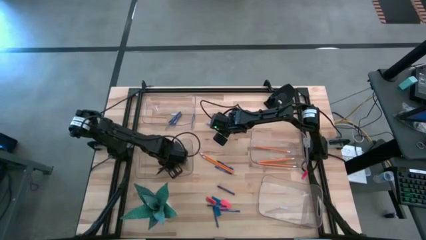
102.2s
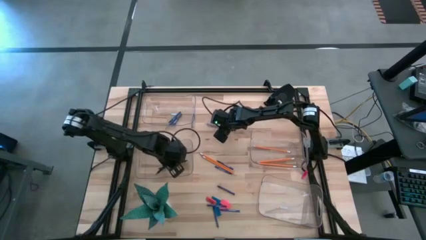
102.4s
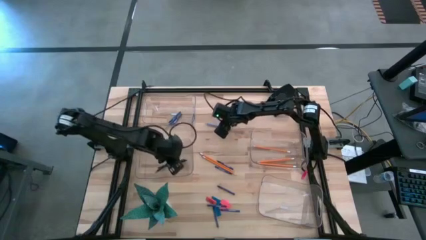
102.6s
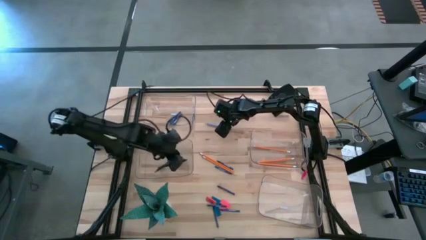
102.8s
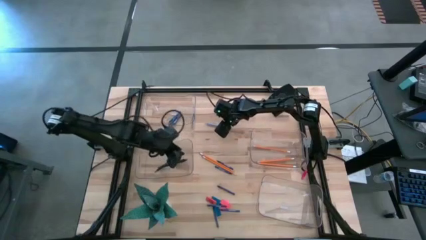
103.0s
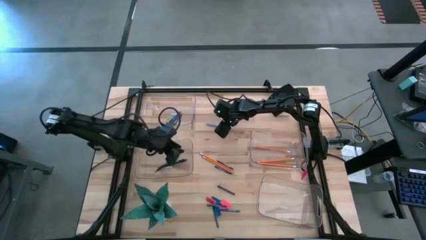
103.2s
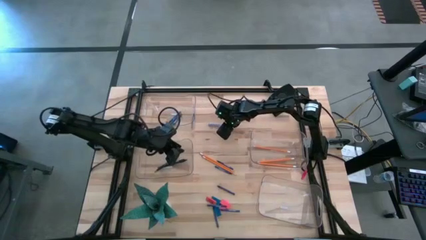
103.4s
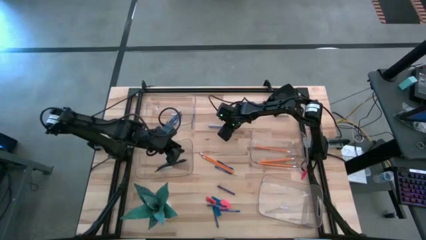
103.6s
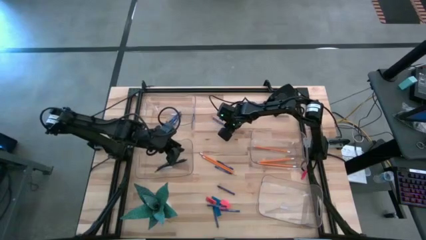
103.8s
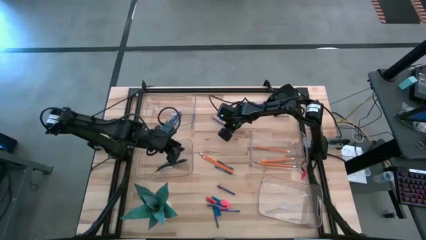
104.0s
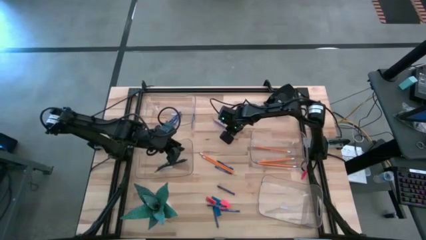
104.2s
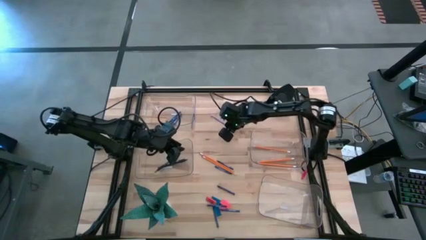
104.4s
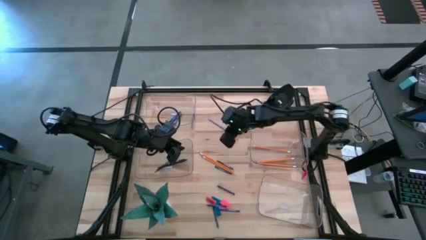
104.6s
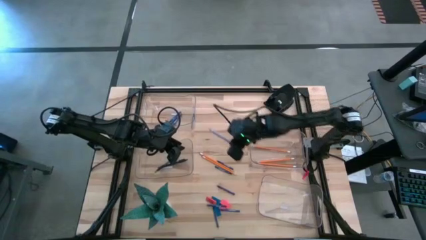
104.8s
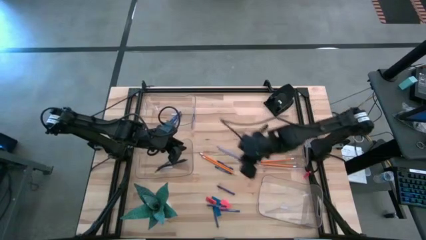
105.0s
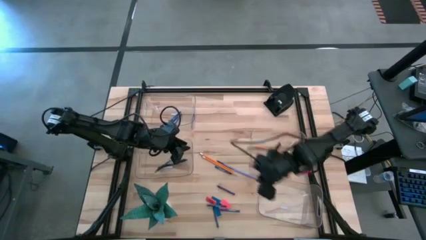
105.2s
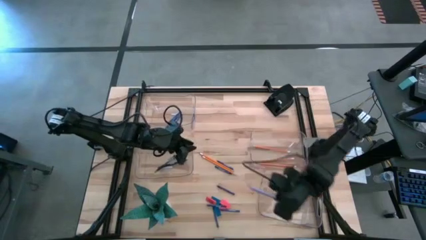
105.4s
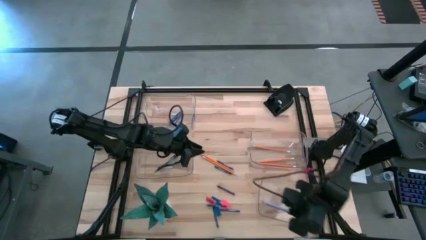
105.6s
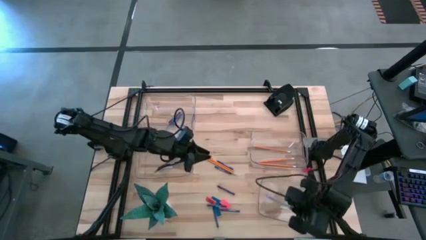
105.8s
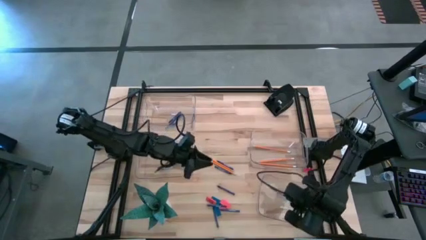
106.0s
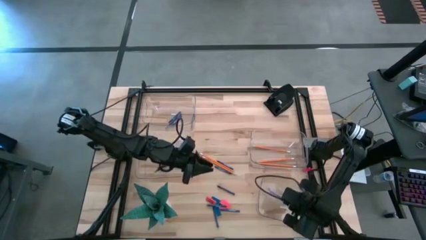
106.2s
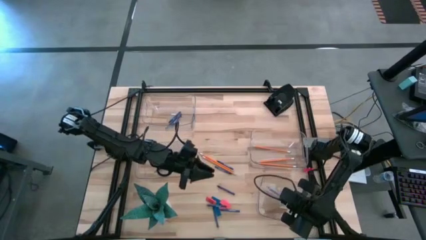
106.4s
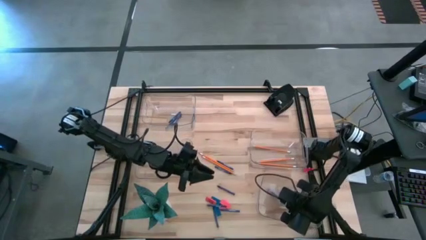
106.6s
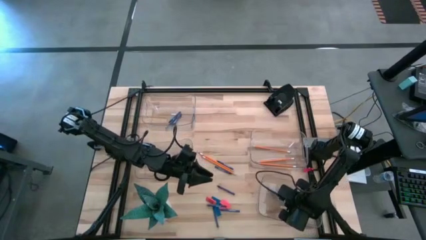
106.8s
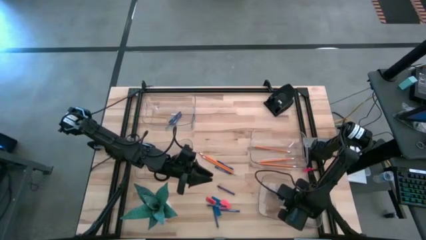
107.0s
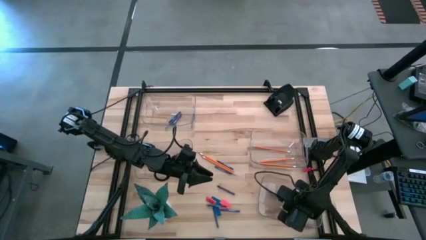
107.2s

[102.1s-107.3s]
Task: Sort crayons/erasers/pens/pencils in bins
Put the purple pen into the bottom transparent bin

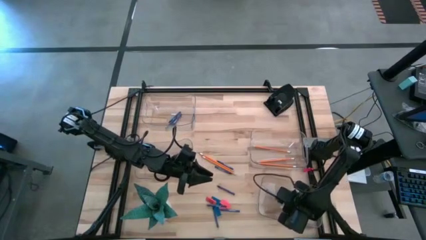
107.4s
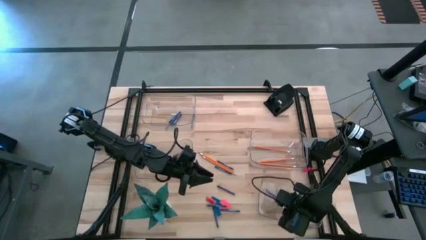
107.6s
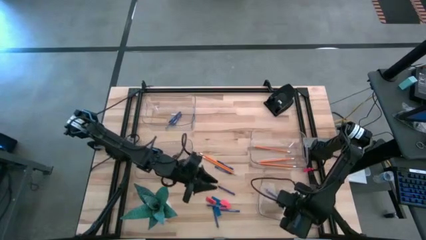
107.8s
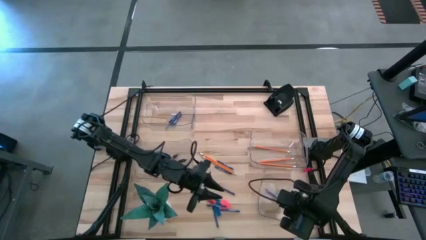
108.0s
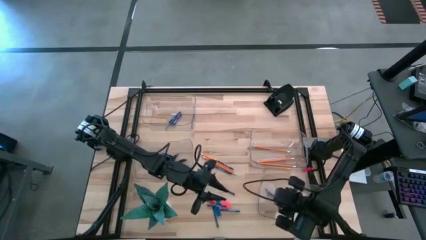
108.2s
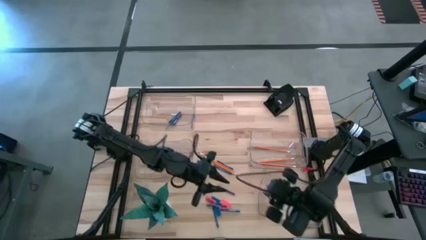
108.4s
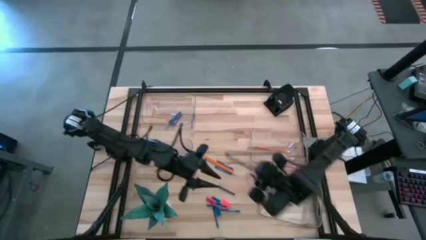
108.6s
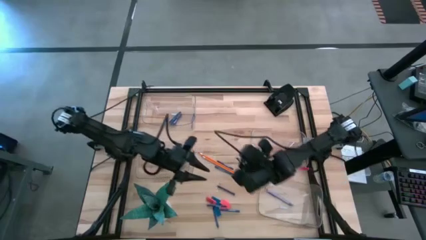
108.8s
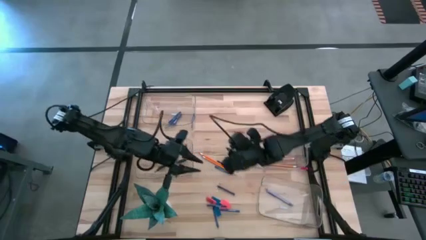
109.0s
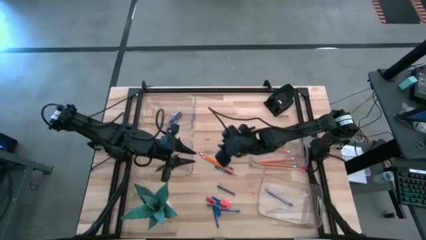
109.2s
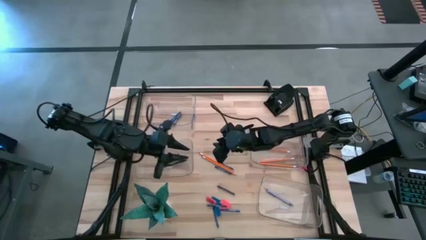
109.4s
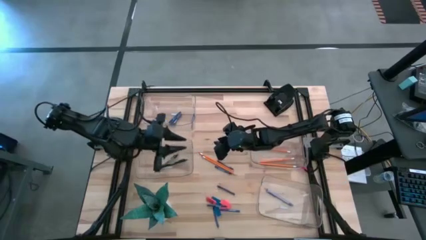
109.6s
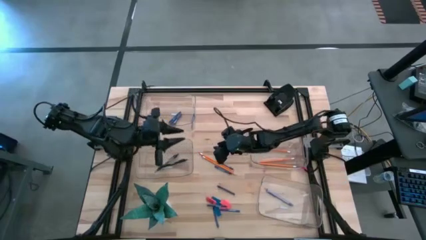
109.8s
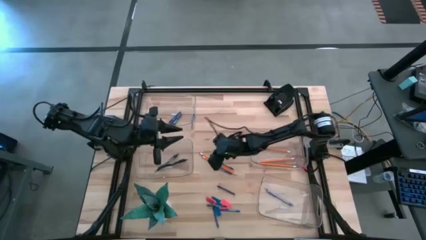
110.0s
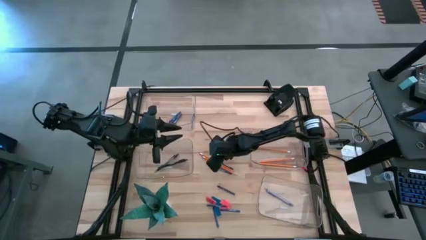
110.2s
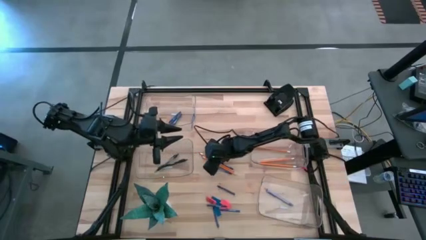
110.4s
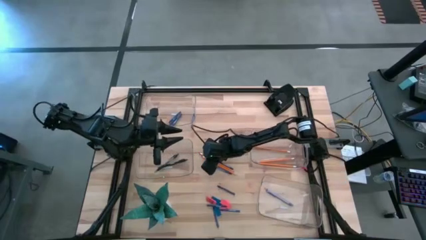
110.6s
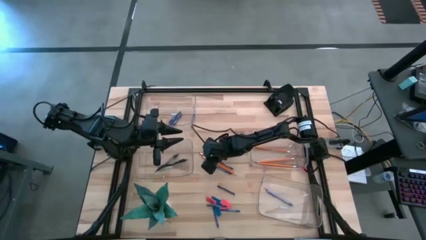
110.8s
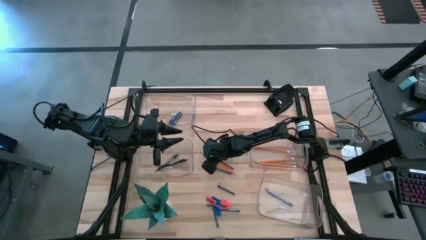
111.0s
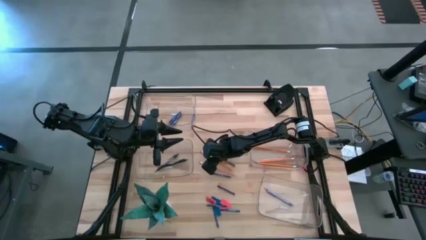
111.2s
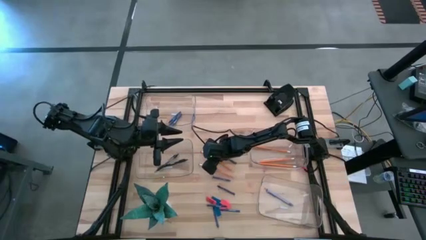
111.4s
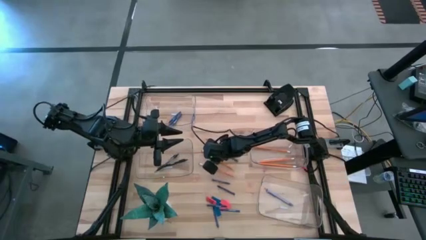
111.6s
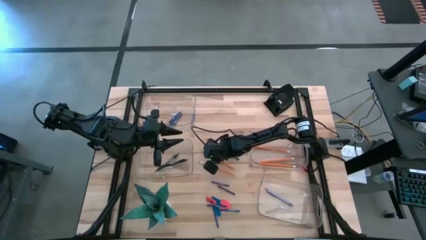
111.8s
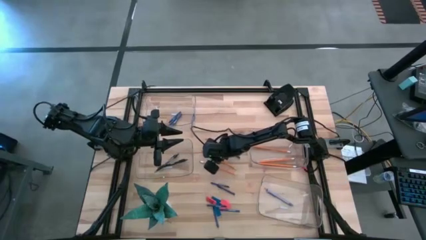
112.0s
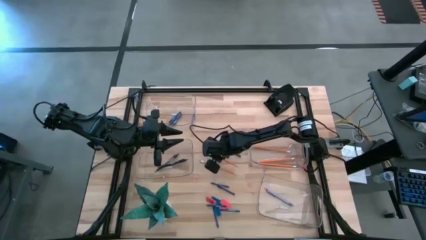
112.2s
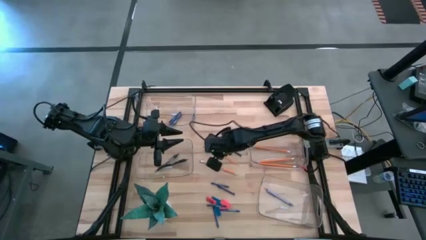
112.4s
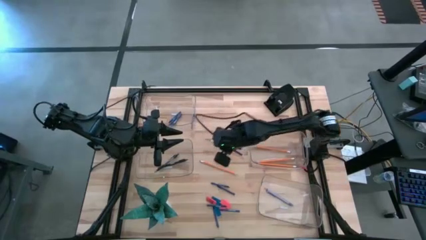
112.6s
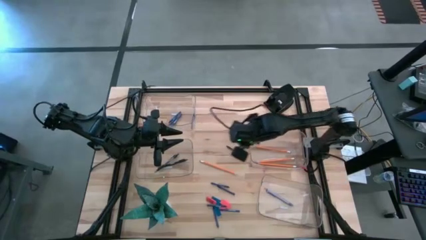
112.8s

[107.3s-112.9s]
Put the orange pencil into the middle right transparent bin

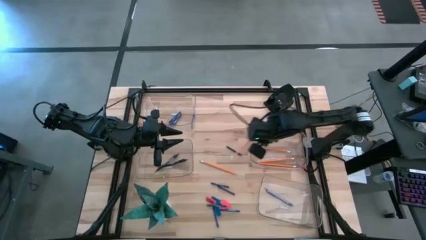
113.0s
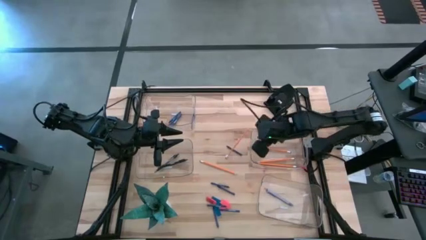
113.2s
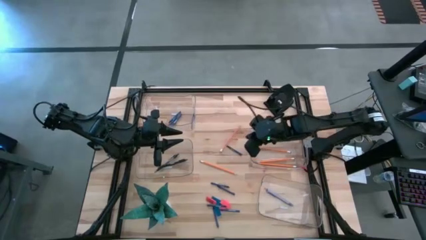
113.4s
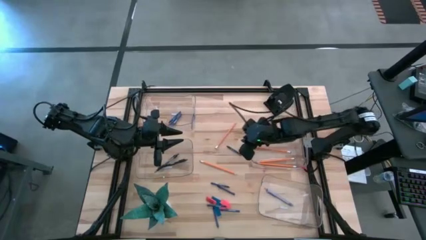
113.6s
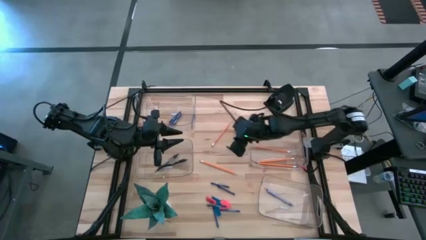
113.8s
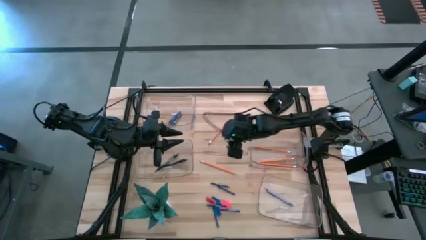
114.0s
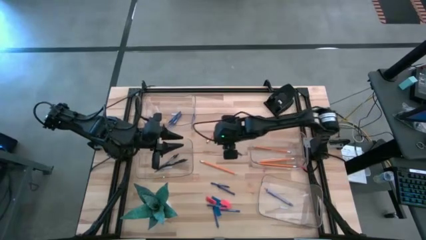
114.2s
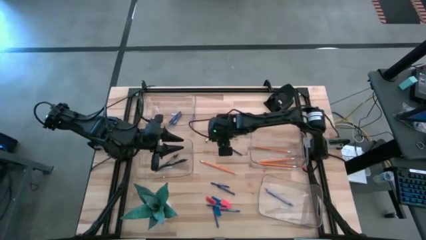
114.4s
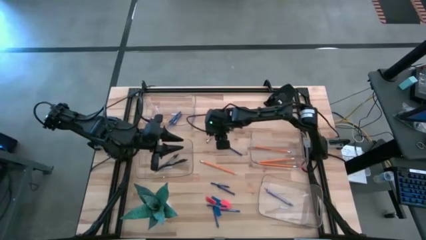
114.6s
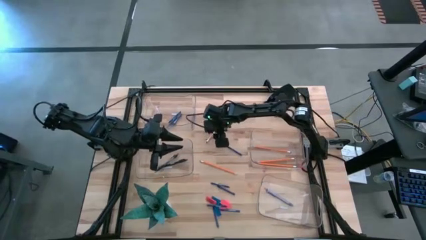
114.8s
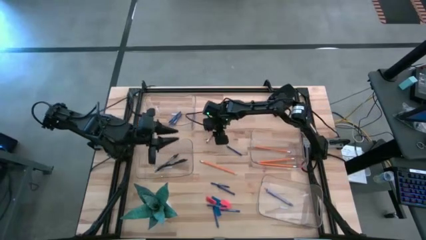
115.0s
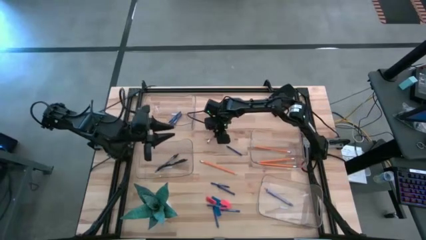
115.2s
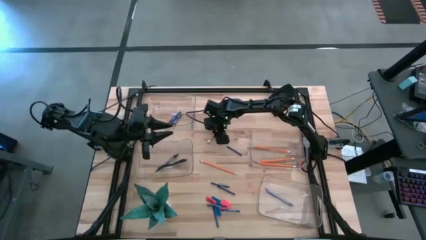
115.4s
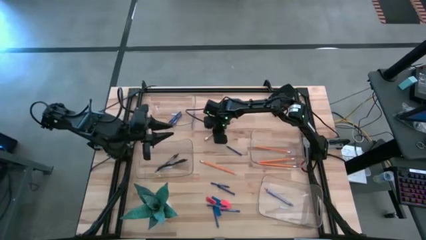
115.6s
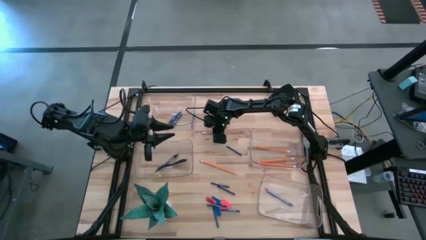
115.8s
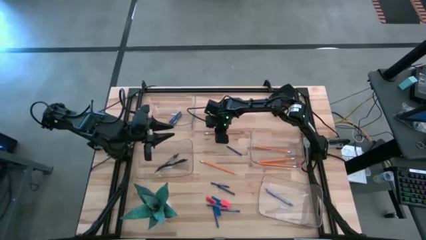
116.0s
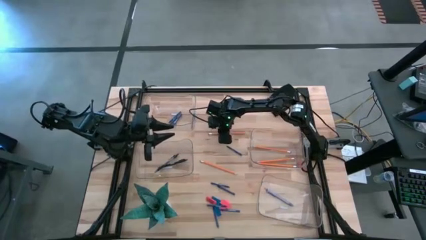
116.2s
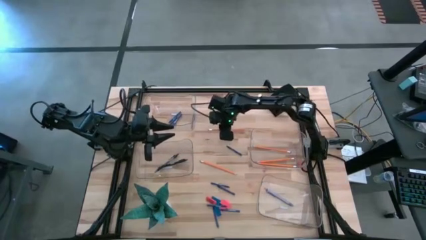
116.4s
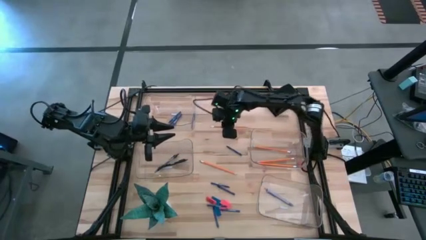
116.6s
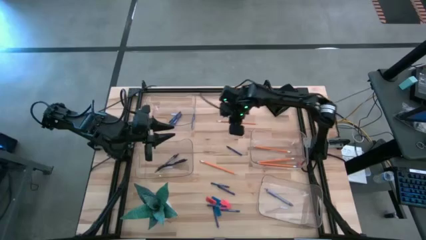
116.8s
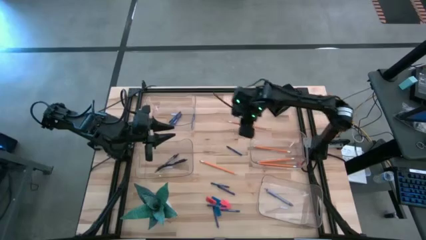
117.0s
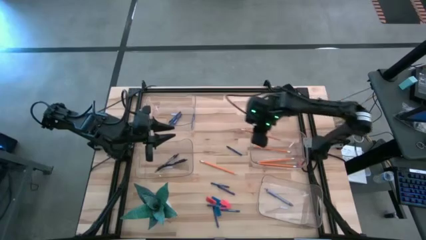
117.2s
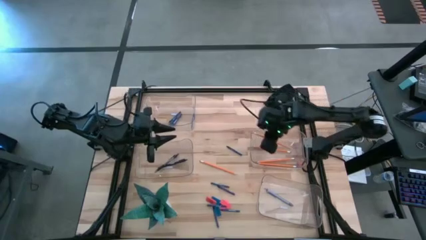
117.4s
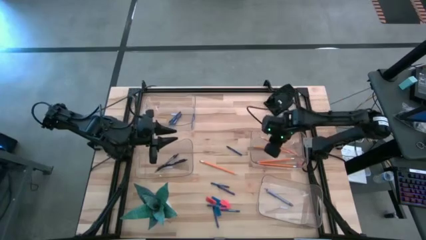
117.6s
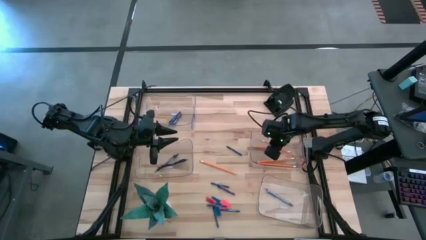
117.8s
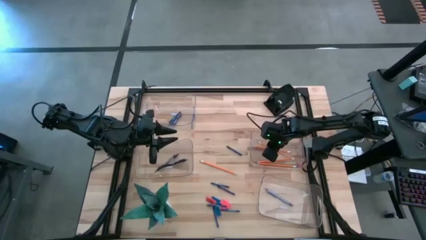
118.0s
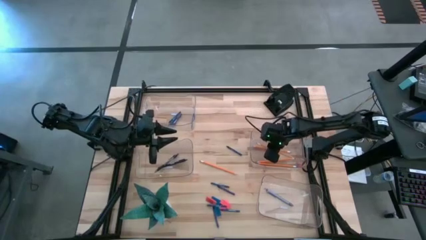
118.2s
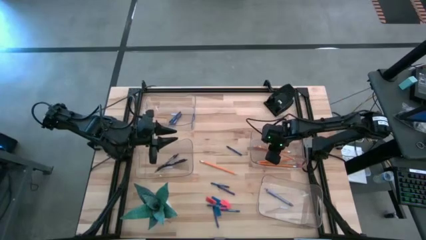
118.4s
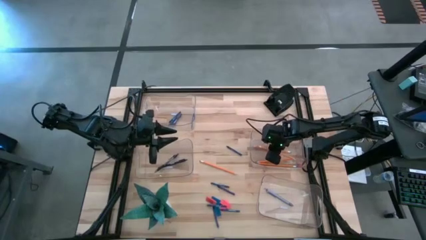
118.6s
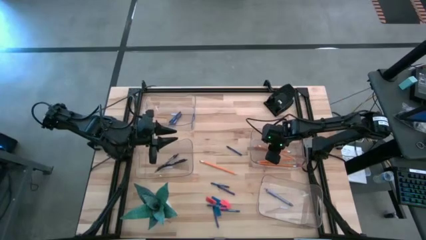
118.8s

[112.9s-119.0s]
Put the orange pencil into the middle right transparent bin
